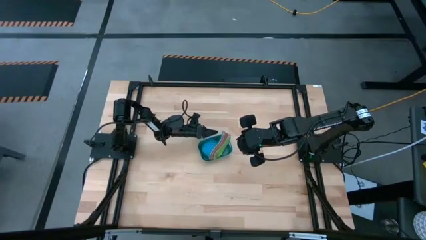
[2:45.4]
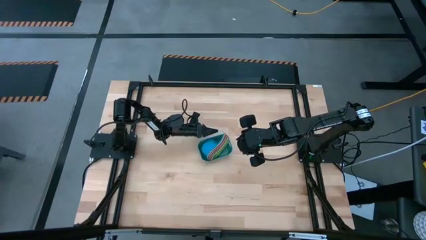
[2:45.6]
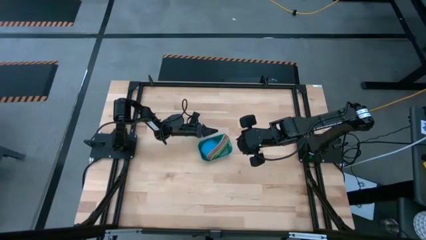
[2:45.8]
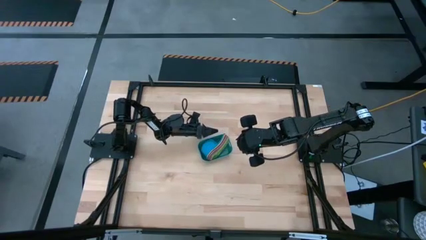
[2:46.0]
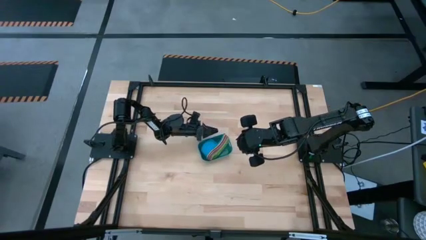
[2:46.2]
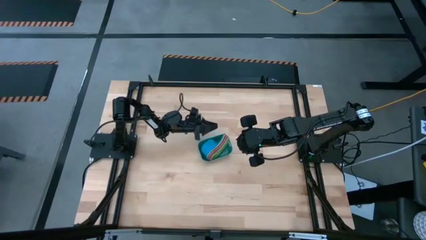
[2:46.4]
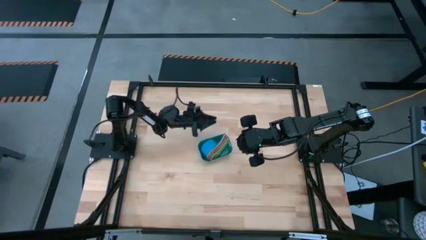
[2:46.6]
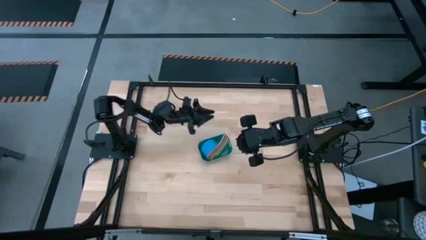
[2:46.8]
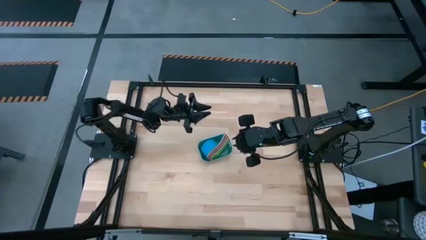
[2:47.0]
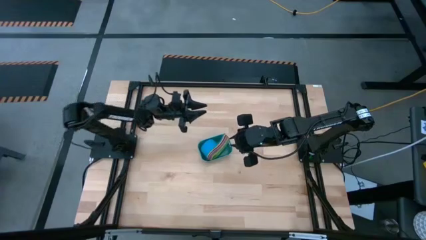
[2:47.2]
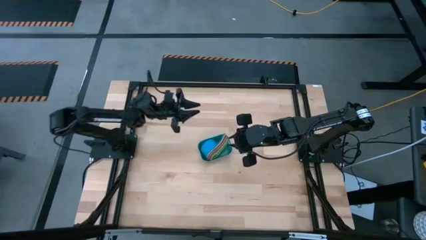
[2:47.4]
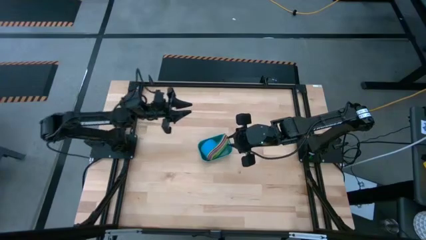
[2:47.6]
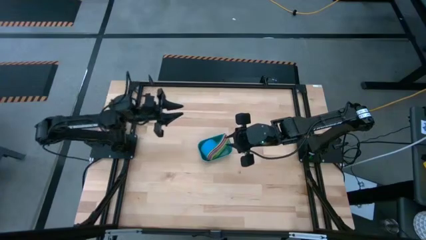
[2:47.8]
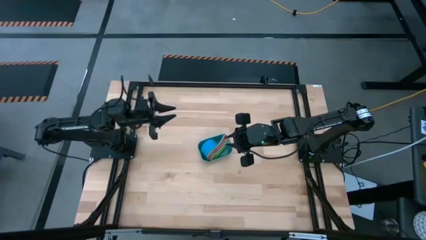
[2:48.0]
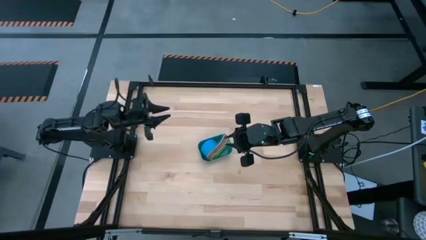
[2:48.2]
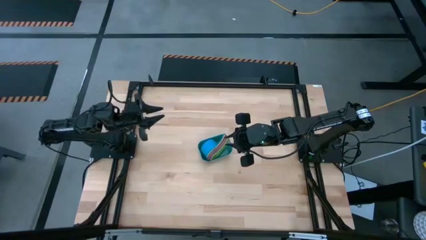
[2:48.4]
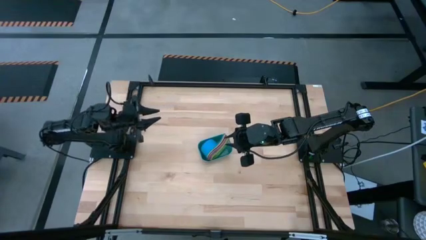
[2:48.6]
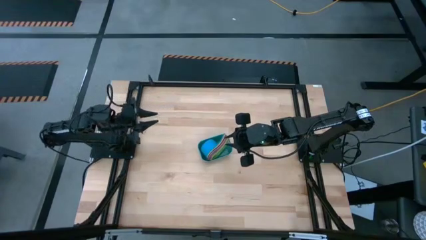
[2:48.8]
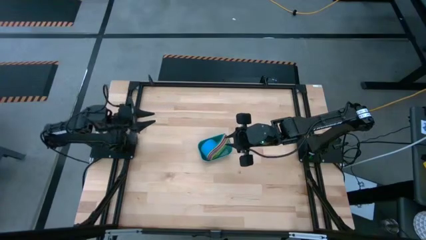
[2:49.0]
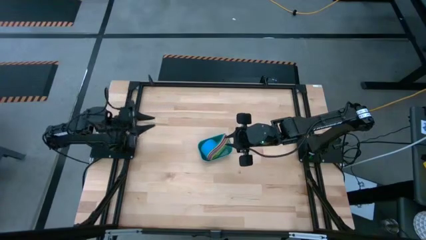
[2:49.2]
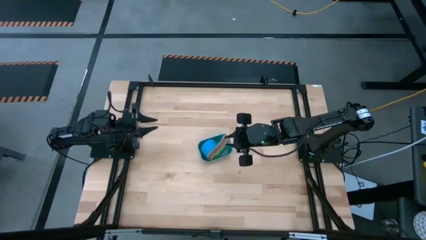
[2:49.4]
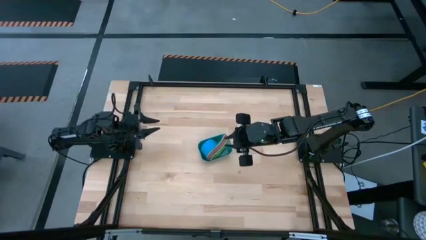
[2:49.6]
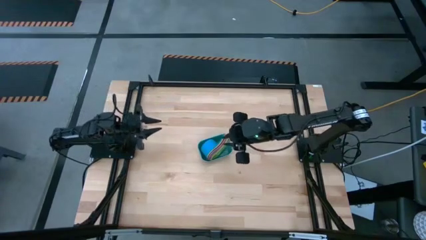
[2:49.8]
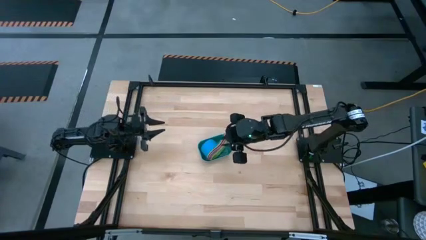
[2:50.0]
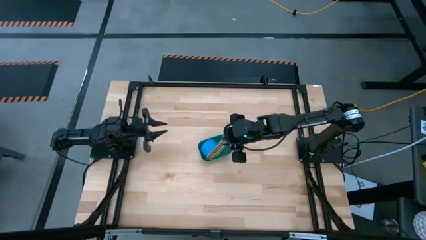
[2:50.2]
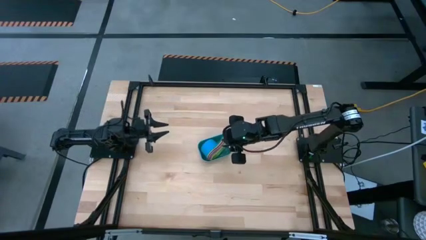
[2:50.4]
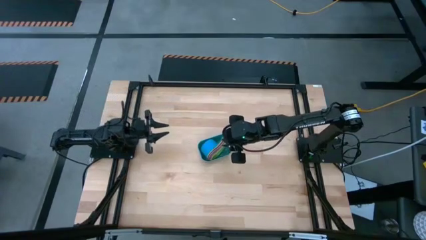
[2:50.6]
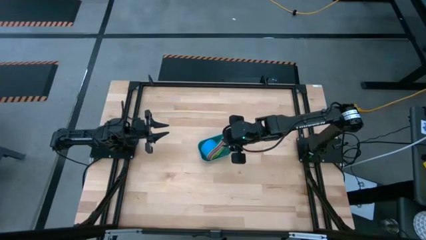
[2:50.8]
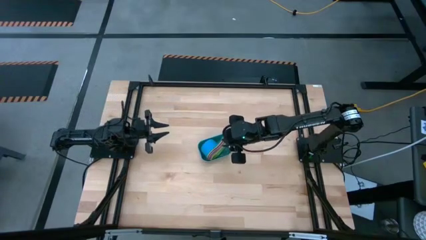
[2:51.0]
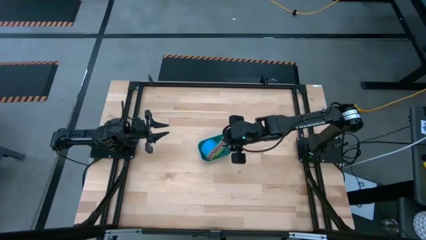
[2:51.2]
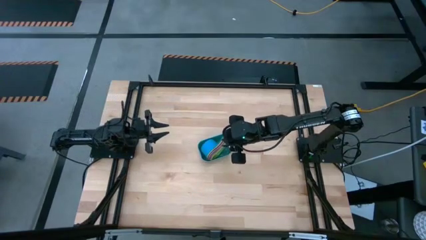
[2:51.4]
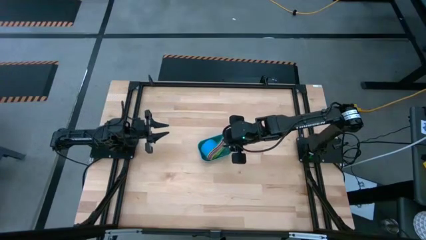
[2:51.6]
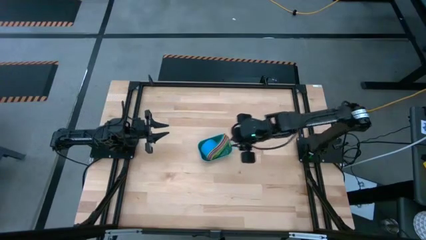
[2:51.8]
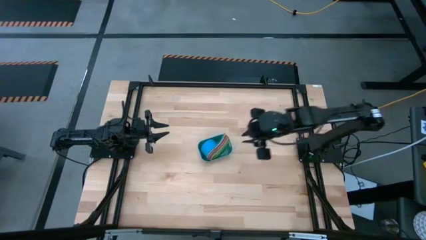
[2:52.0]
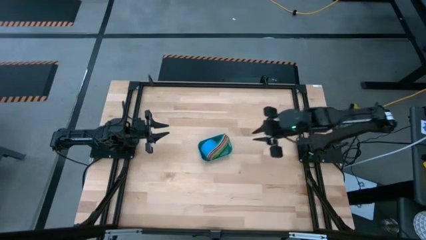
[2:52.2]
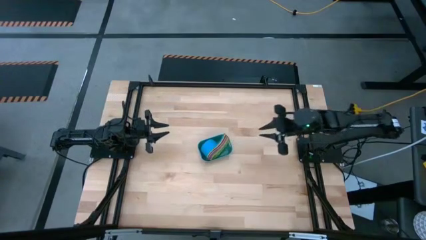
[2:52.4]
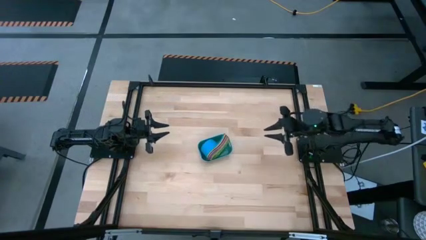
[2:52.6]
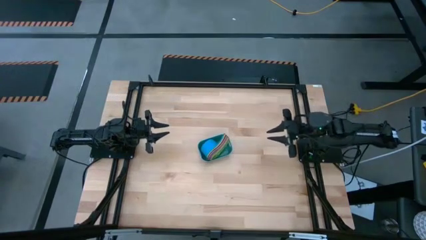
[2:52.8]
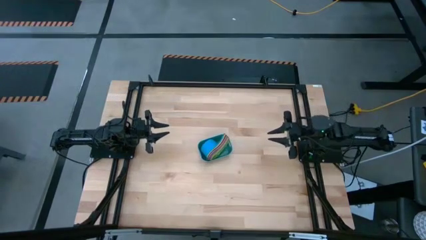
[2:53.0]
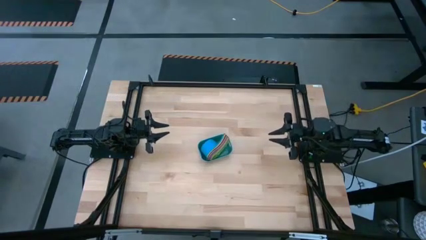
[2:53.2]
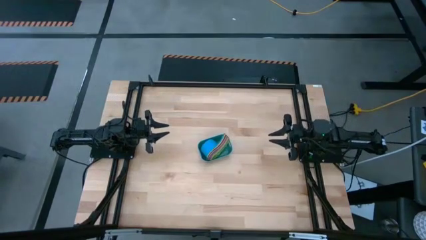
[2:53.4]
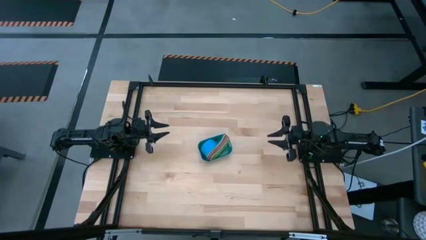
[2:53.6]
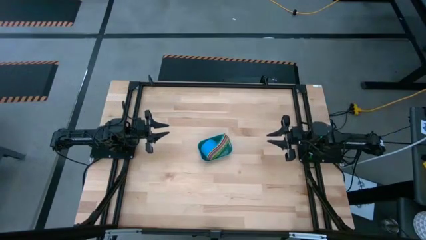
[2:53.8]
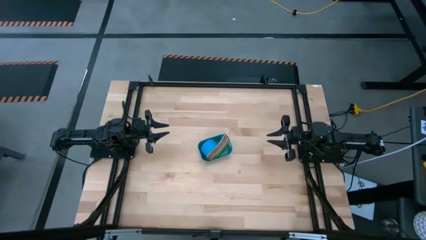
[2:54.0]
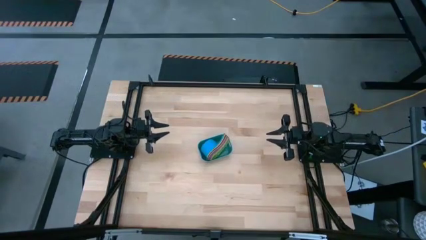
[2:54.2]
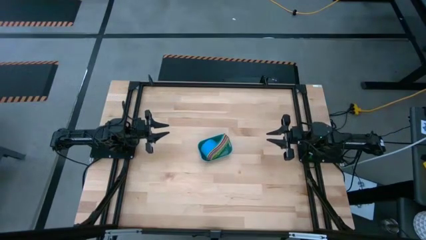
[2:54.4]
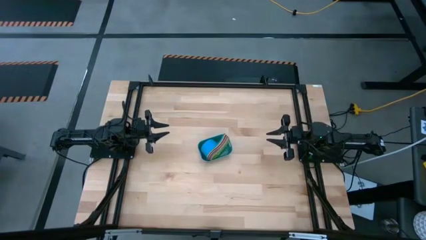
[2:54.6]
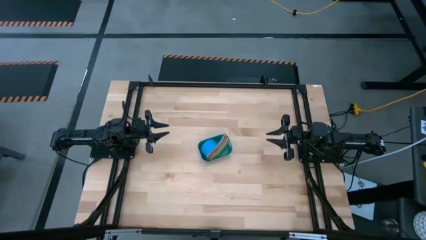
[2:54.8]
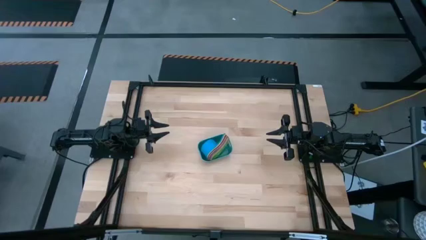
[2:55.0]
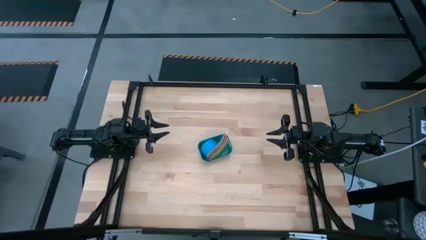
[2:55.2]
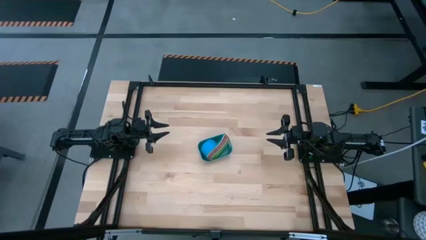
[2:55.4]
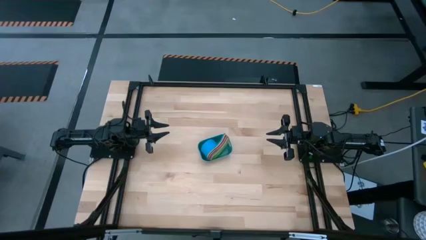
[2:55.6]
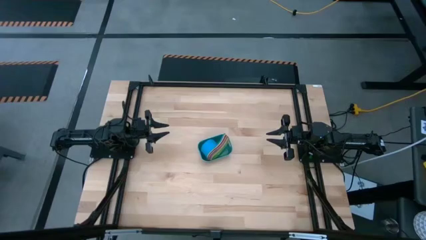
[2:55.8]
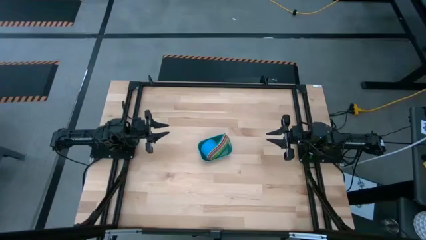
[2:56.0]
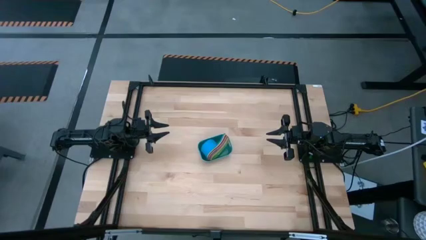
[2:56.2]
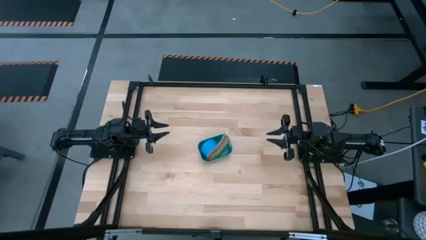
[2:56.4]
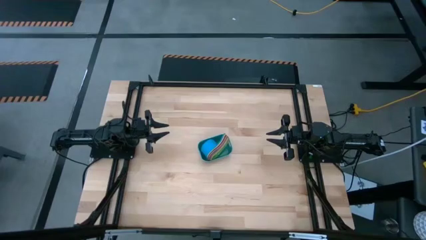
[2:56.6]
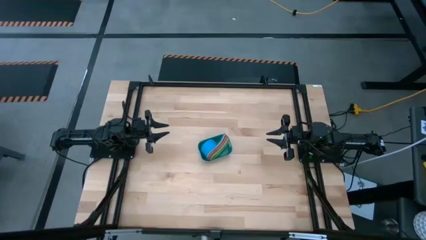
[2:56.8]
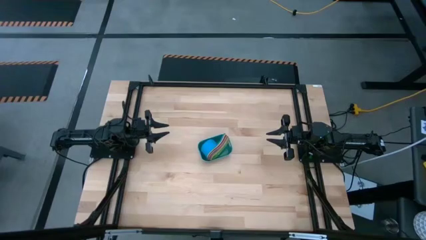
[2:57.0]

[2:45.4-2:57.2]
Task: Nest measuring cups in basket
Return to Home Position

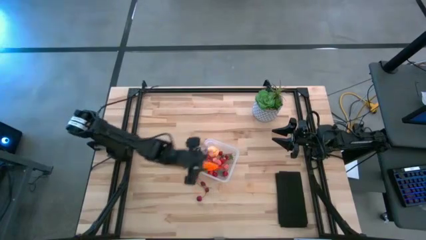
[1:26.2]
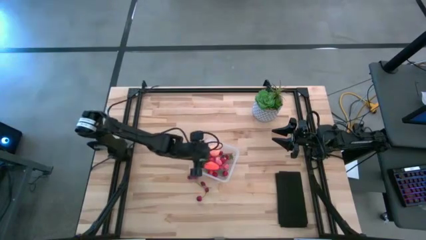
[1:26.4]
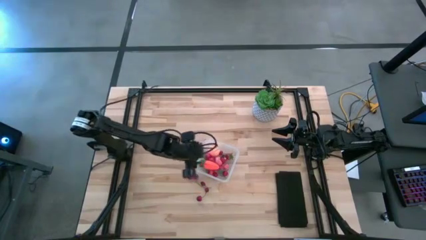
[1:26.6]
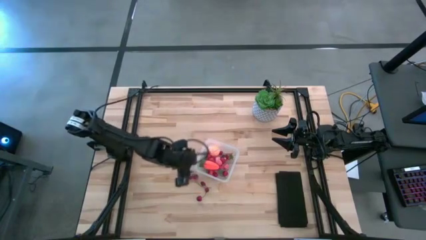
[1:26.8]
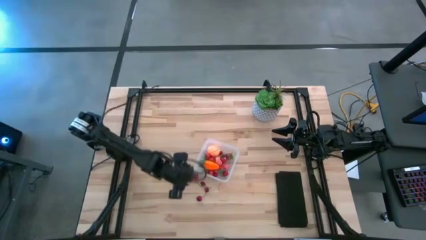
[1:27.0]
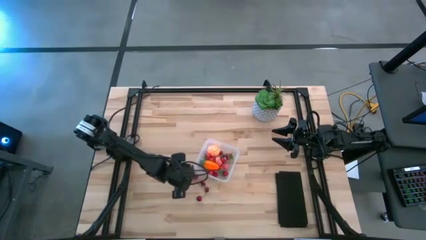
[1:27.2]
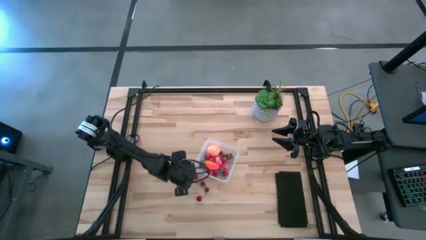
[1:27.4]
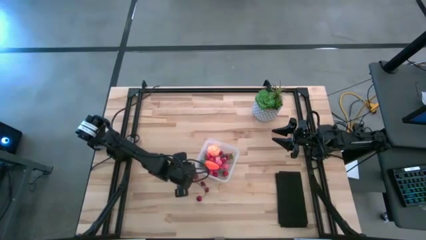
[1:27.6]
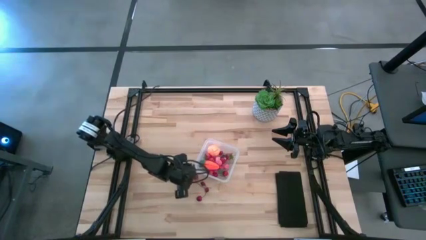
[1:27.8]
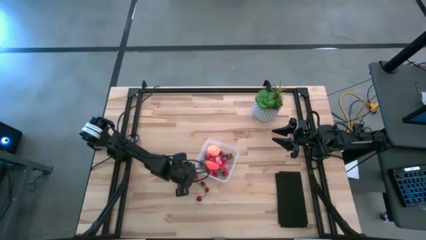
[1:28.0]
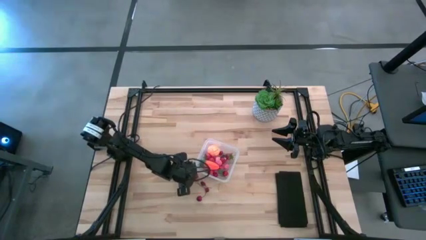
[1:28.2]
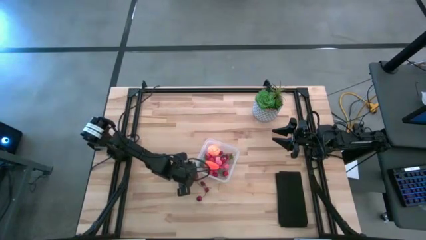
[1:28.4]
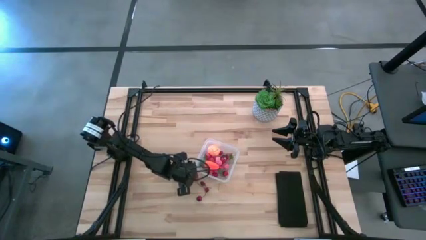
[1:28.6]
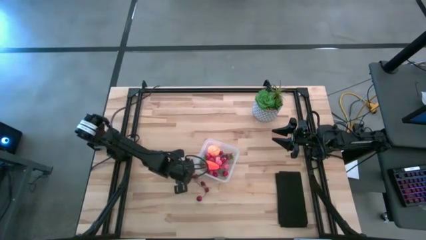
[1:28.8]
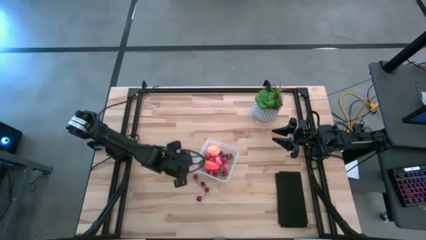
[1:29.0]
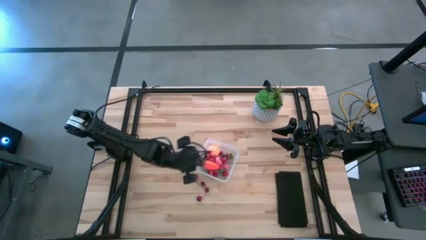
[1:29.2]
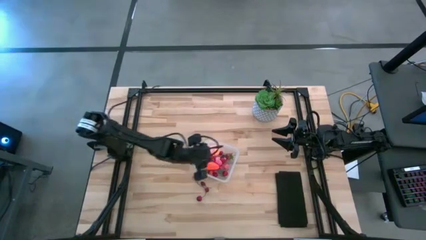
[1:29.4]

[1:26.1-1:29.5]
Task: Pick and placing Produce into tupperware
Put the red cherry into the transparent container

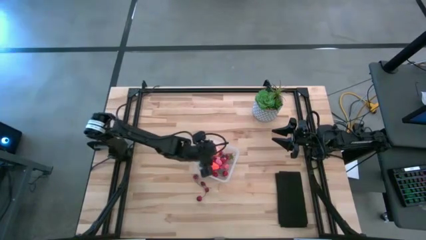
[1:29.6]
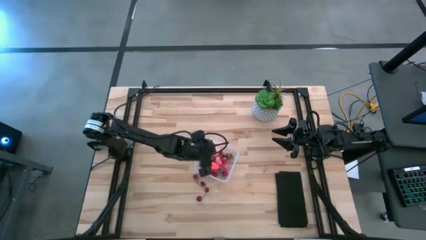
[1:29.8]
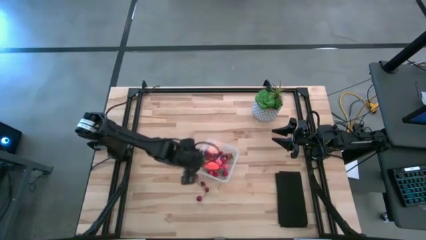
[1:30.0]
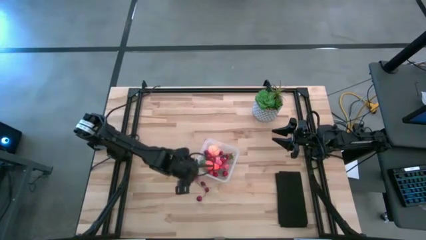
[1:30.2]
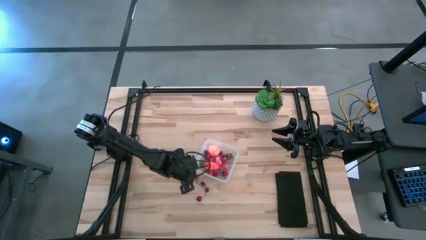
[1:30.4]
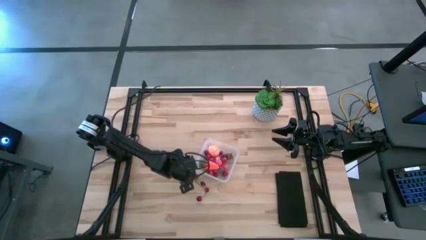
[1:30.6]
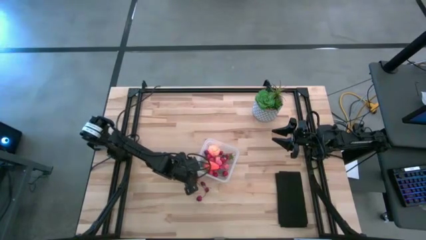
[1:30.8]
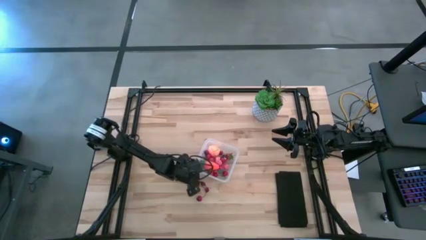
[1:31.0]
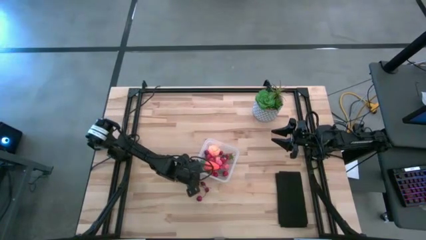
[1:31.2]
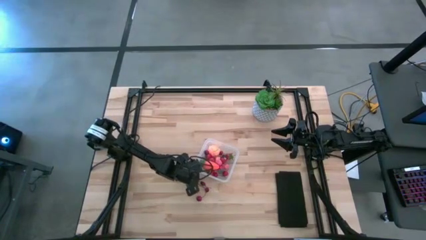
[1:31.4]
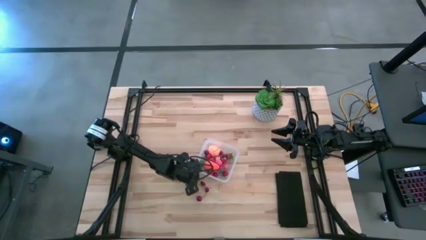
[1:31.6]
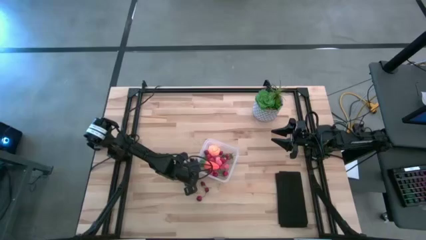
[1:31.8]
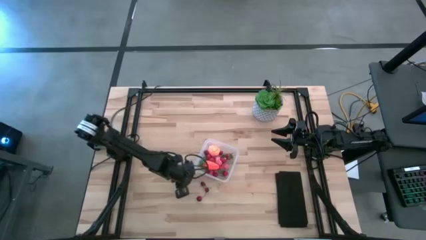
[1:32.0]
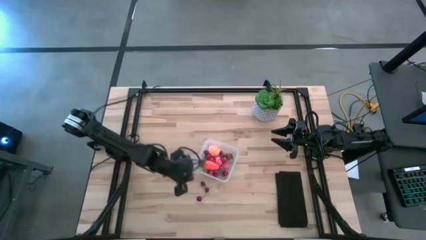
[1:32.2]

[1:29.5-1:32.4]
Put the red cherry into the transparent container
